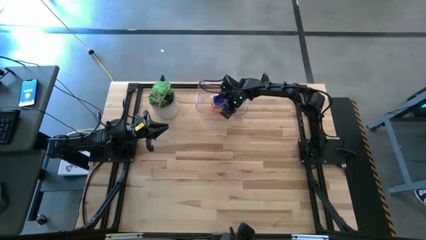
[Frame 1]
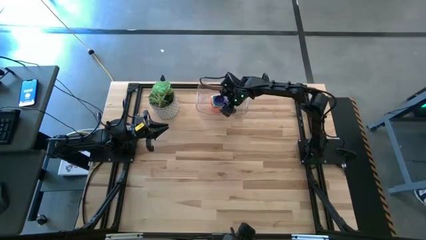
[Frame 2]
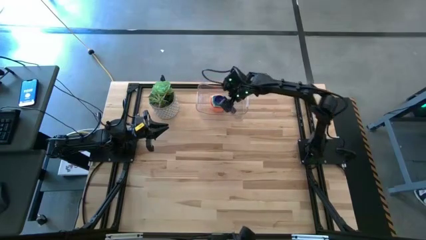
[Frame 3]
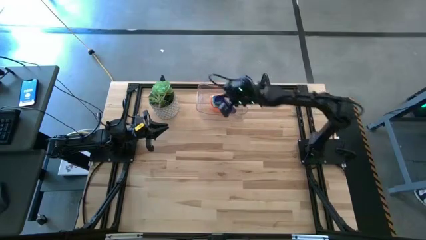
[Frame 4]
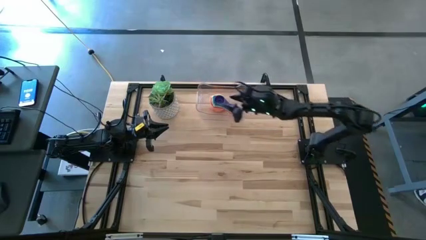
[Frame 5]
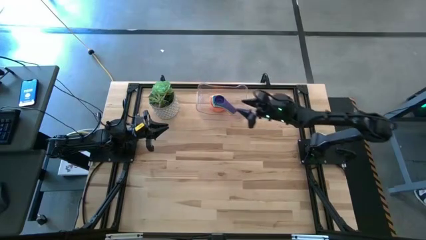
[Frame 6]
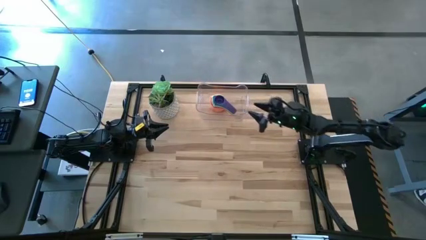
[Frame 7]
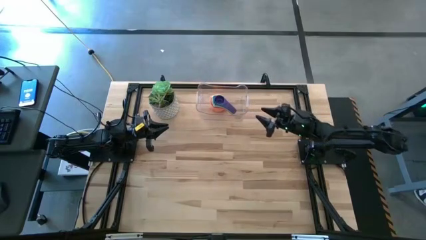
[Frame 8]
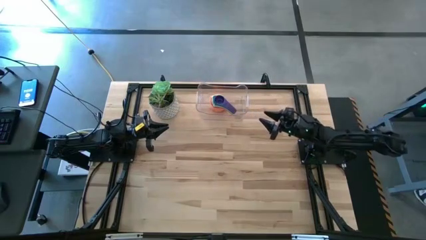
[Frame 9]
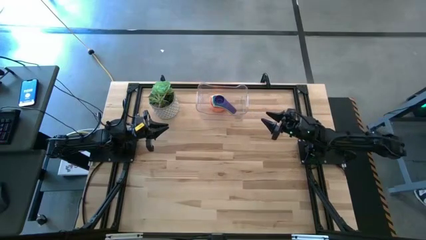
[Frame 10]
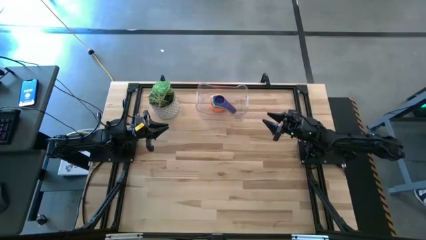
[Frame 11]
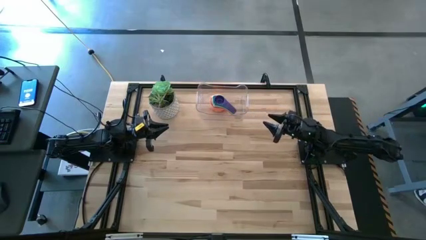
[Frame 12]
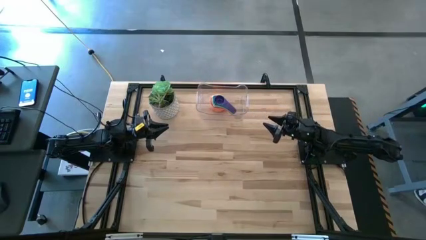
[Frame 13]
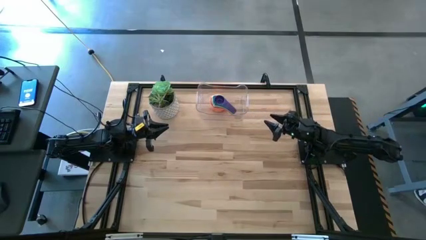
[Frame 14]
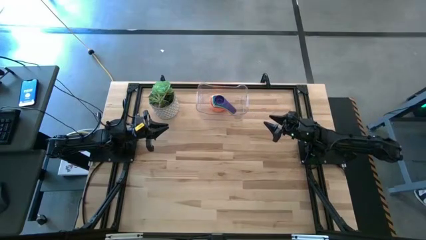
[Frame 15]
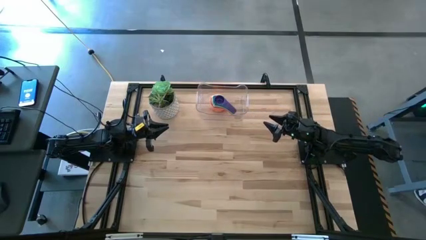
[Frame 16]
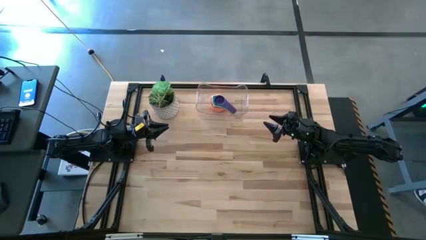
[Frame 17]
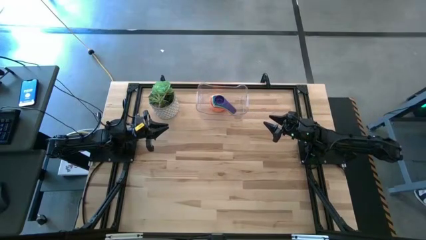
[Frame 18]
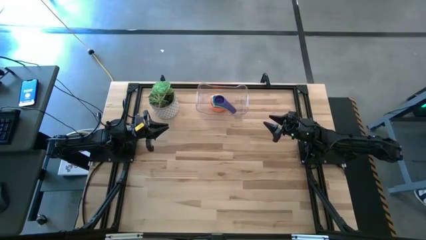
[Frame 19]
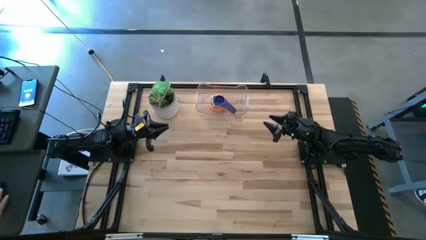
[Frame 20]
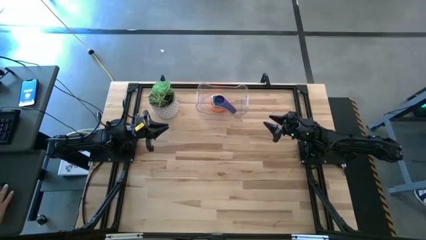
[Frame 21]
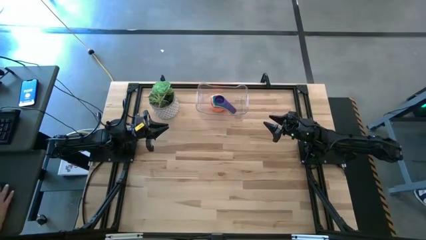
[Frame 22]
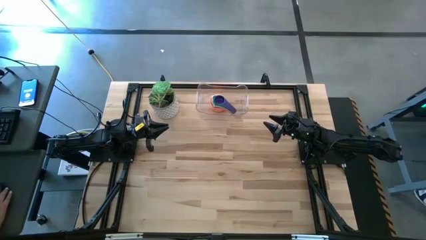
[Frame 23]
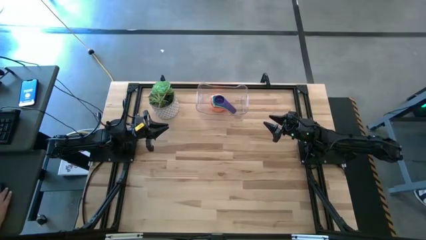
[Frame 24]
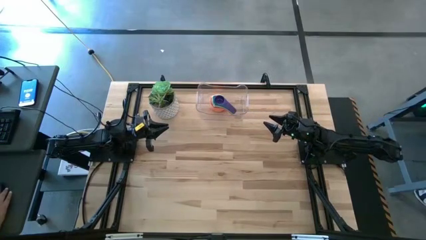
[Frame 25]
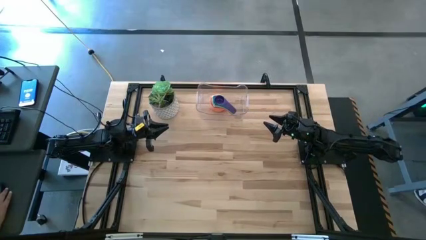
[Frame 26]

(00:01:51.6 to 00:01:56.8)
Task: Nest measuring cups in basket
Return to Home Position

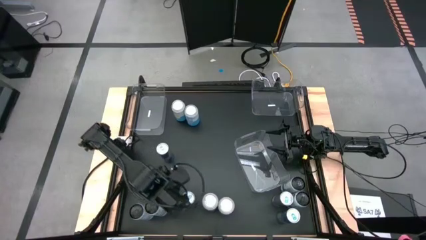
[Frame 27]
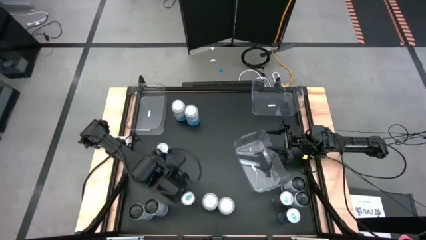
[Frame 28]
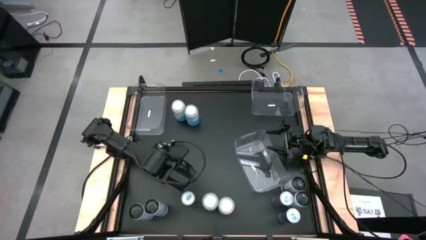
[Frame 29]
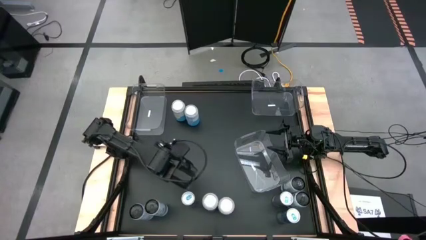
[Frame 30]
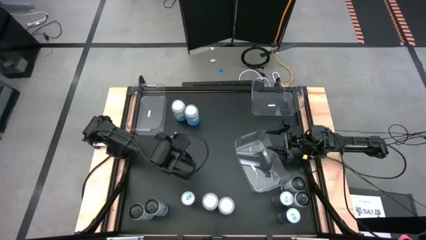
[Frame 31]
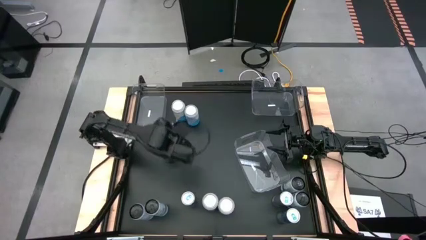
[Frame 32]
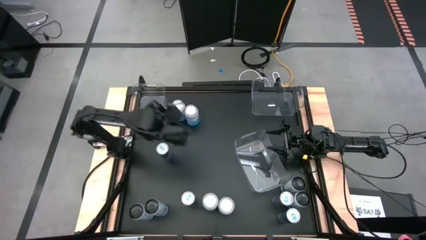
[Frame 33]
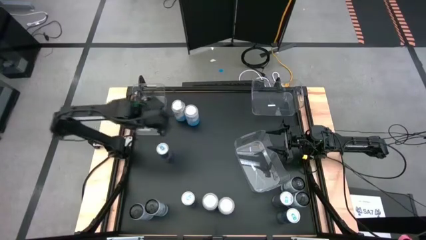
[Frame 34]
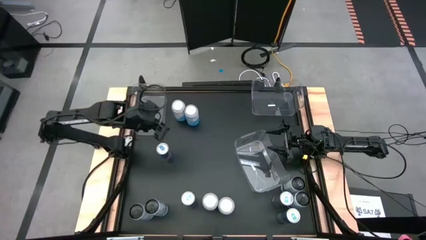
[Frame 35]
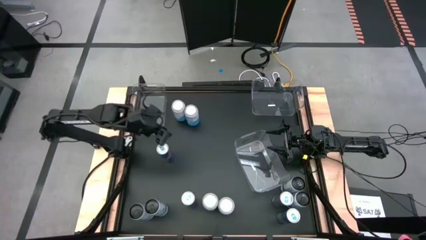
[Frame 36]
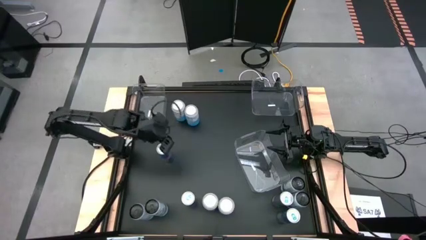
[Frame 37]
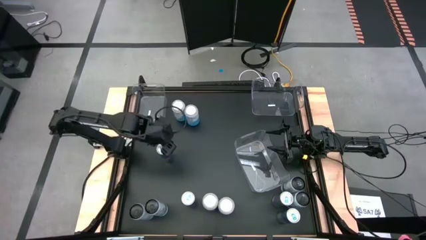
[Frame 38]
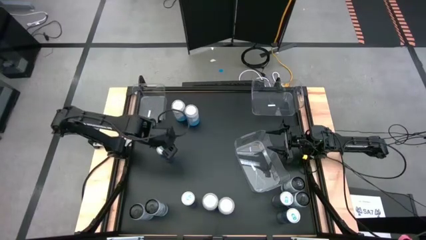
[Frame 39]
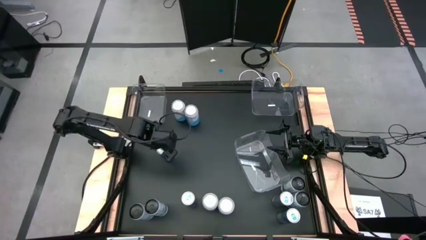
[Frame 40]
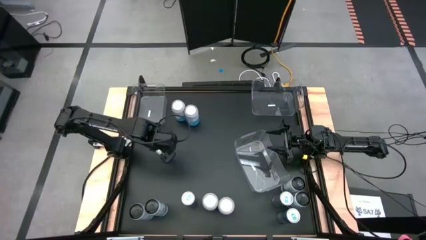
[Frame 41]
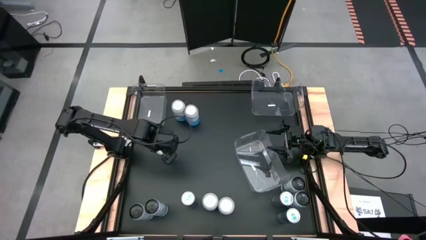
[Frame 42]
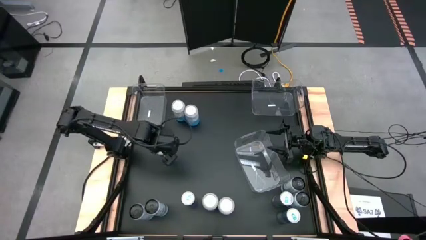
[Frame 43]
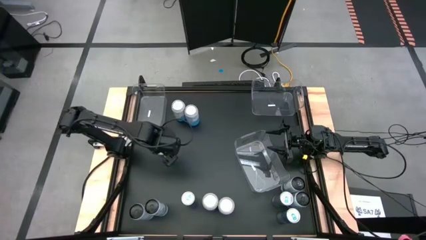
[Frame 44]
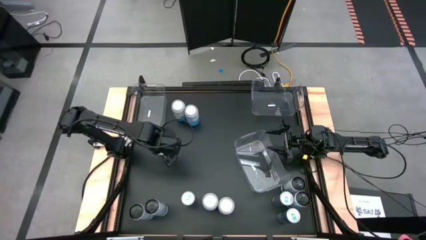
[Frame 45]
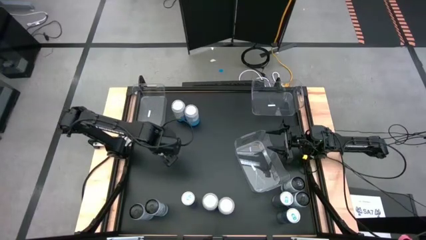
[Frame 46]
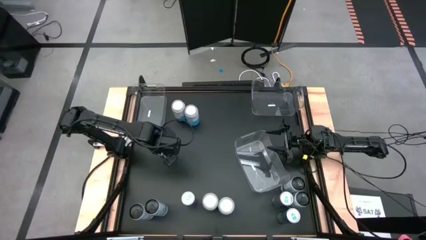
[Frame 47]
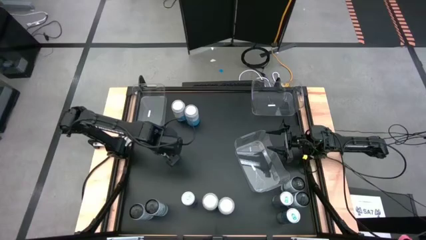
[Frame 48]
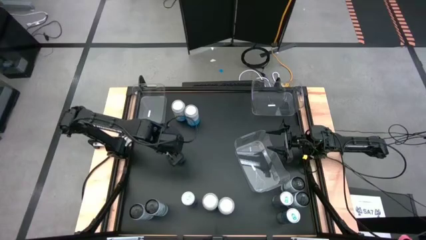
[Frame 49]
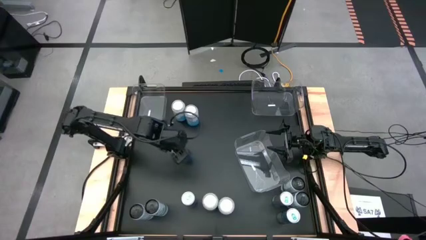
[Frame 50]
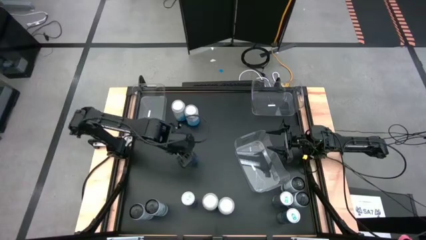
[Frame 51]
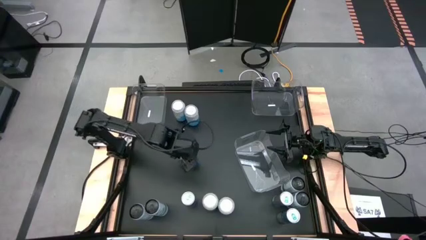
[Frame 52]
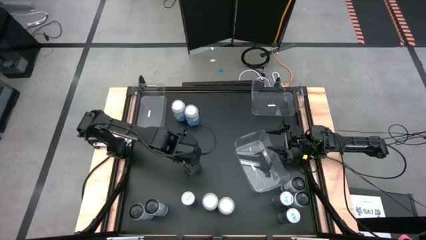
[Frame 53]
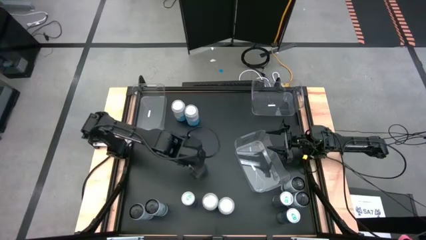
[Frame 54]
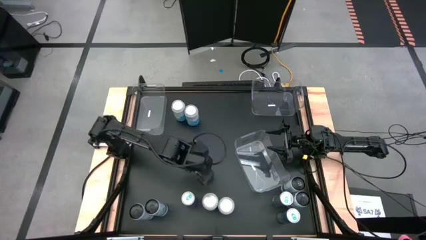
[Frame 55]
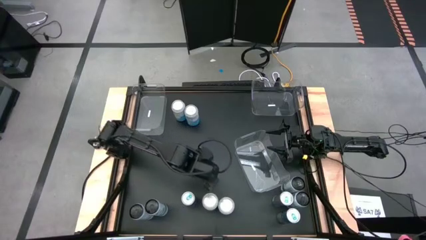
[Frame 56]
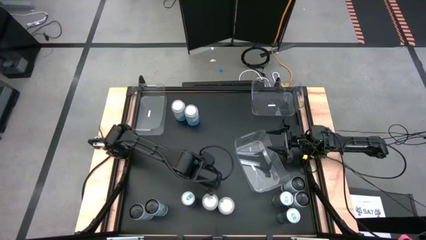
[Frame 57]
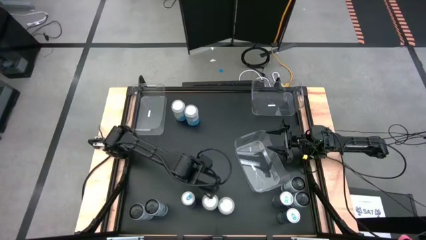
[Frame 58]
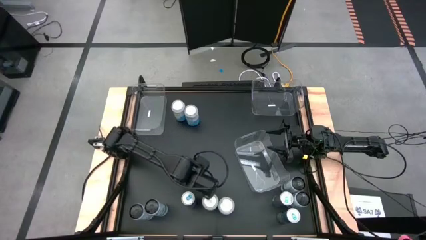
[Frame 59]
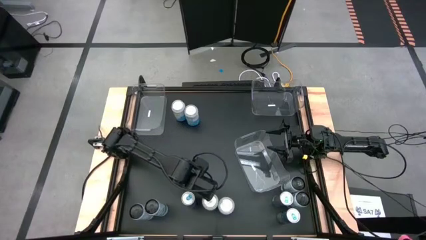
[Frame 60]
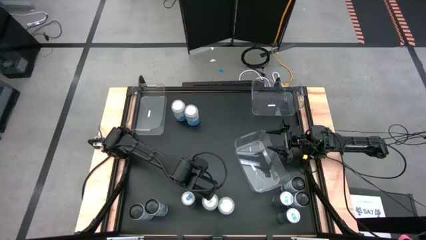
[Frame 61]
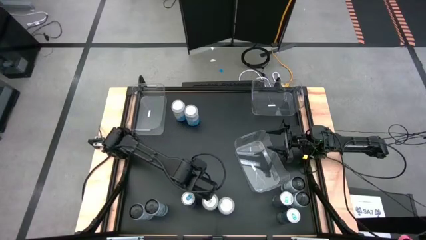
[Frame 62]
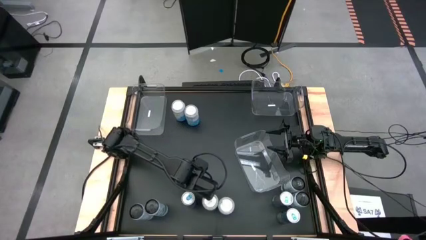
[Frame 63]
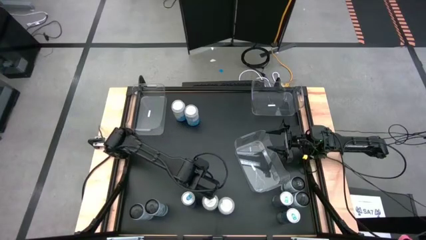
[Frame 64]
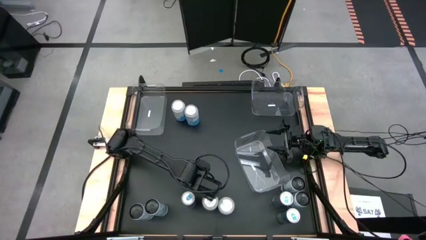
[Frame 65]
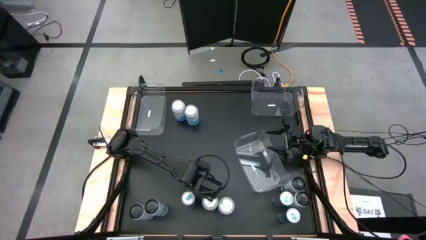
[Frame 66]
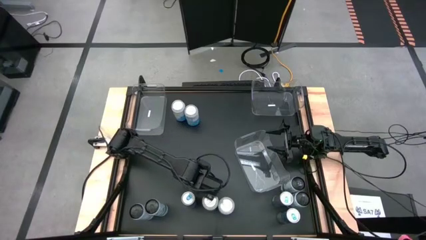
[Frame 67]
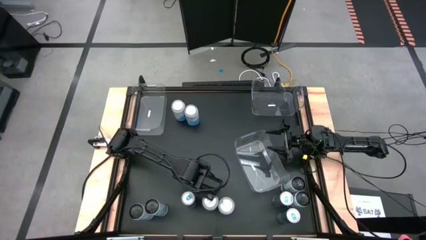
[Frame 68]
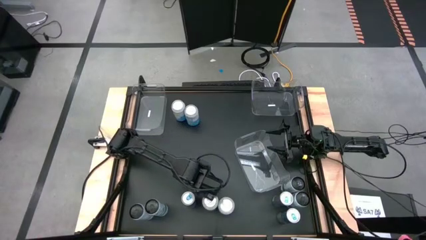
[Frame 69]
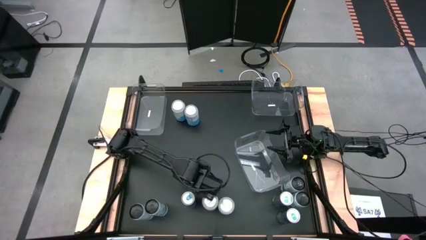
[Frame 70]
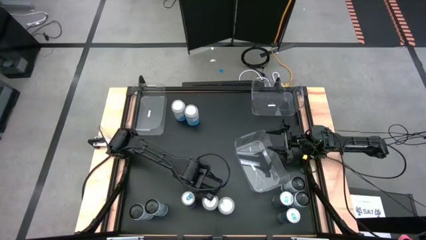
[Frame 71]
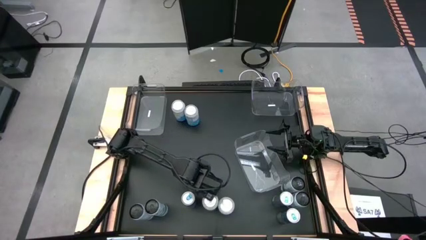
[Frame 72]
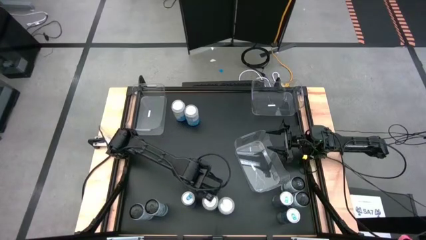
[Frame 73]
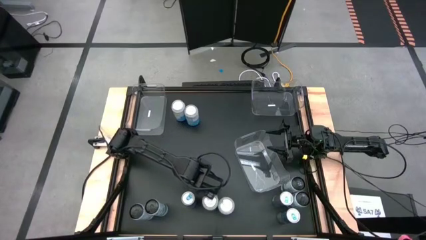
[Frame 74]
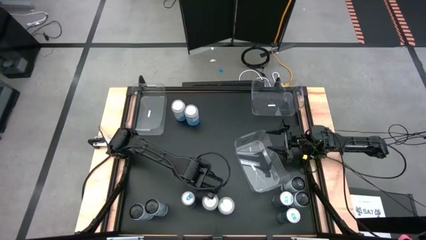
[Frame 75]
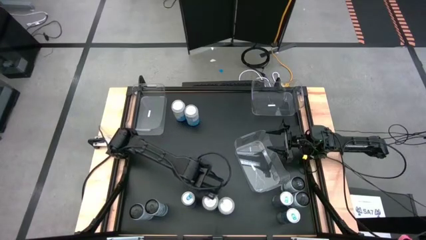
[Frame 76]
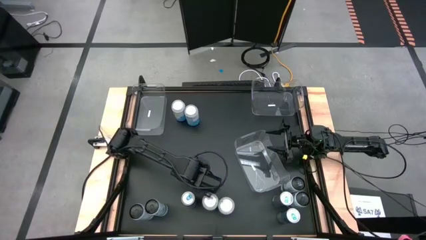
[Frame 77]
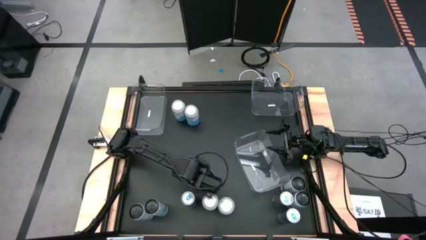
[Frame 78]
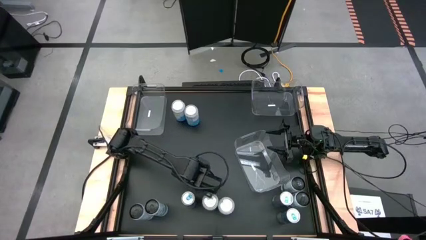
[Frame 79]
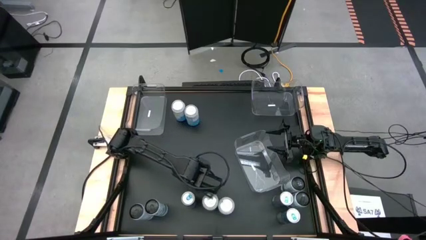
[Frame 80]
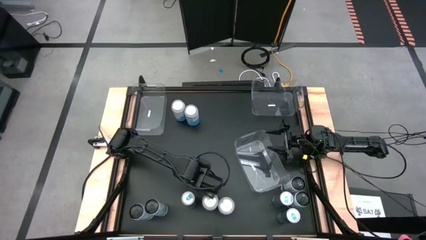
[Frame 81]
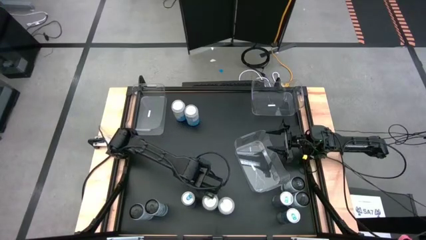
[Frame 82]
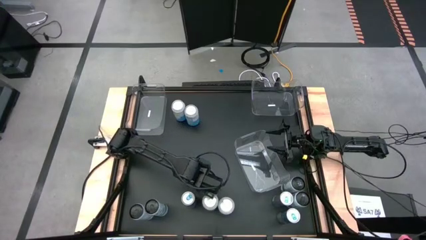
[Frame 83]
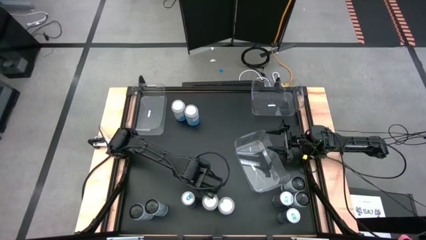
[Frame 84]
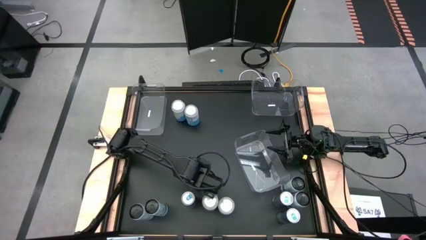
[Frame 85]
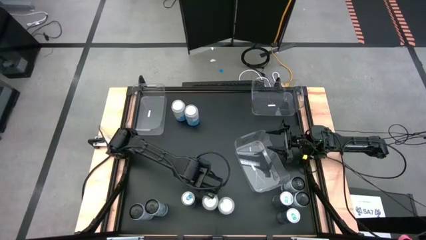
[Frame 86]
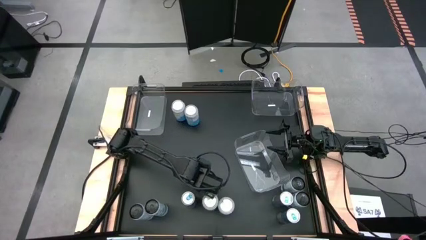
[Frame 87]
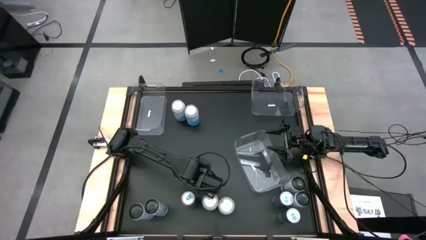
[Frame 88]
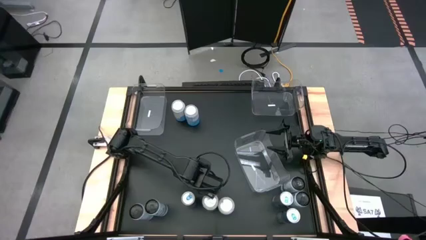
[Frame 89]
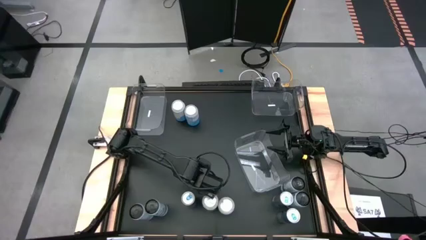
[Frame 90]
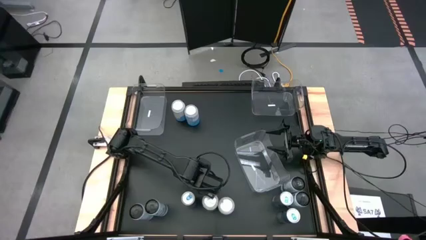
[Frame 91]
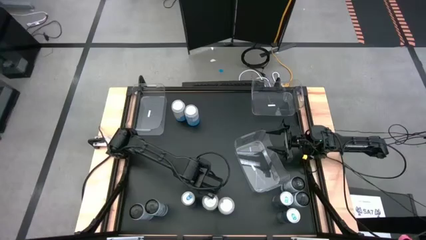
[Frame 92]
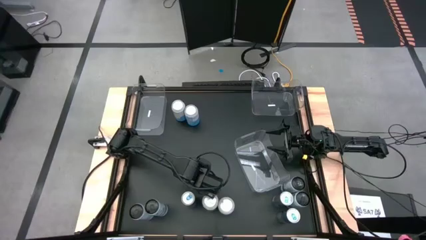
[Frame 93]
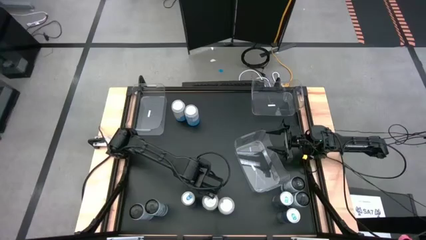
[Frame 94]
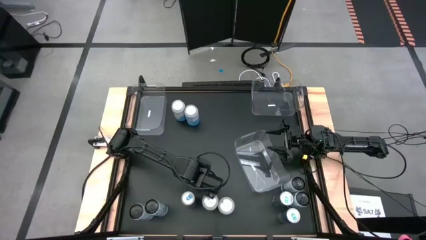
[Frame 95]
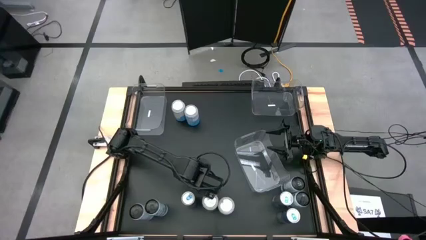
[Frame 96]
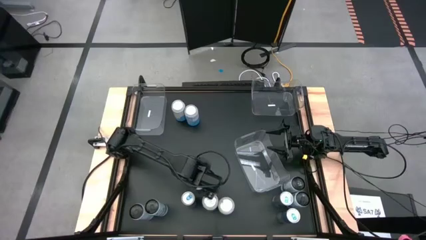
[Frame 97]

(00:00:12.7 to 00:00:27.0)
Task: Sort soda cans
Move the top right blue soda can to the bottom center
